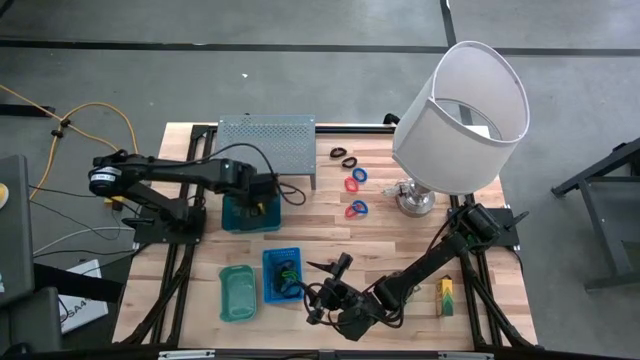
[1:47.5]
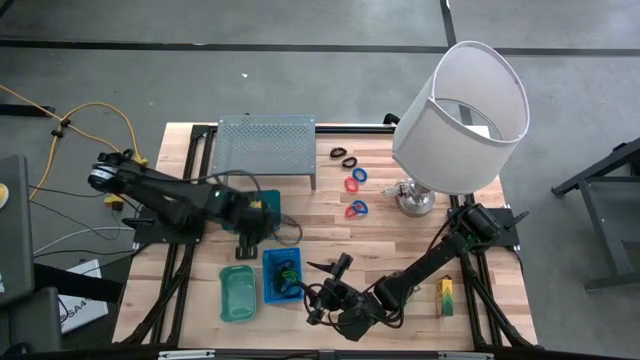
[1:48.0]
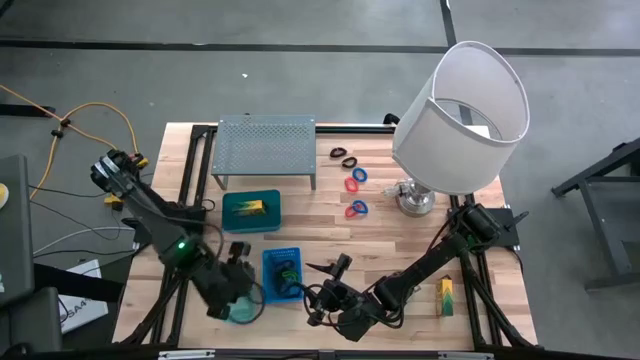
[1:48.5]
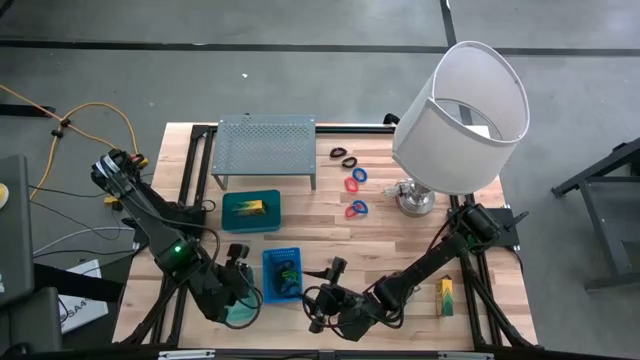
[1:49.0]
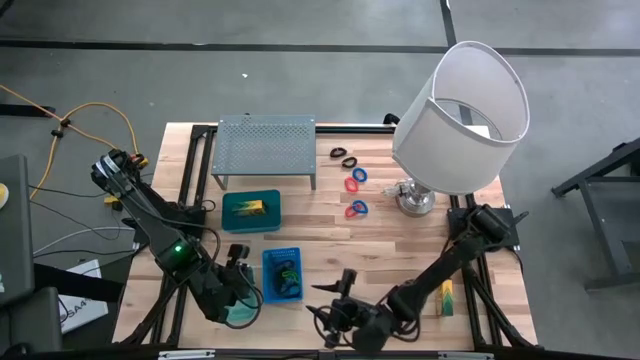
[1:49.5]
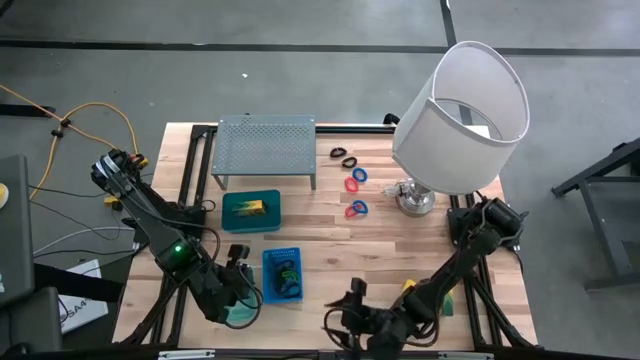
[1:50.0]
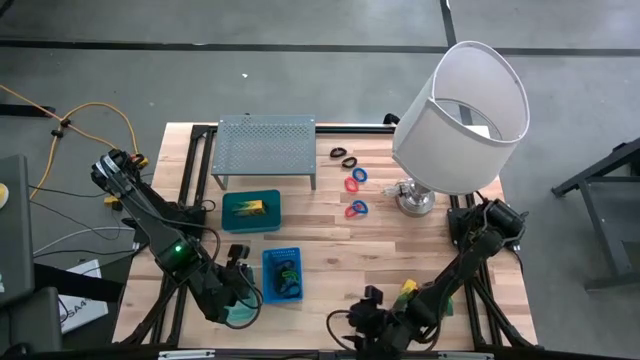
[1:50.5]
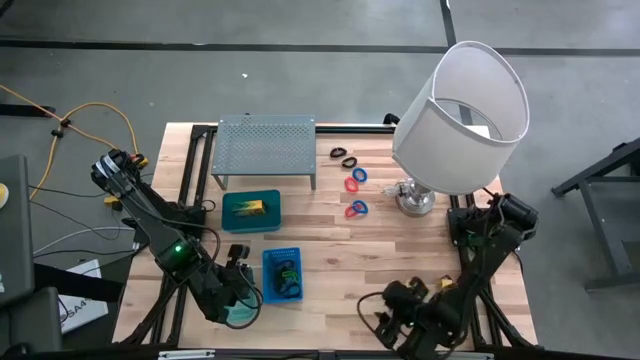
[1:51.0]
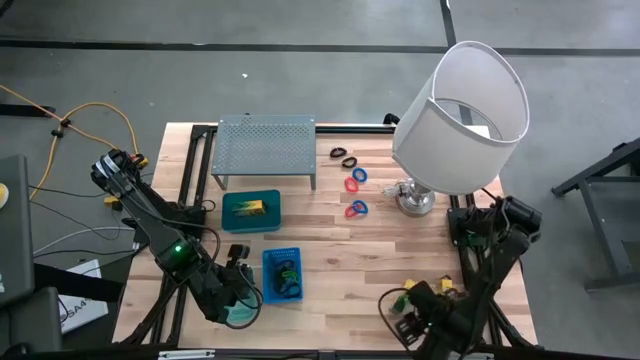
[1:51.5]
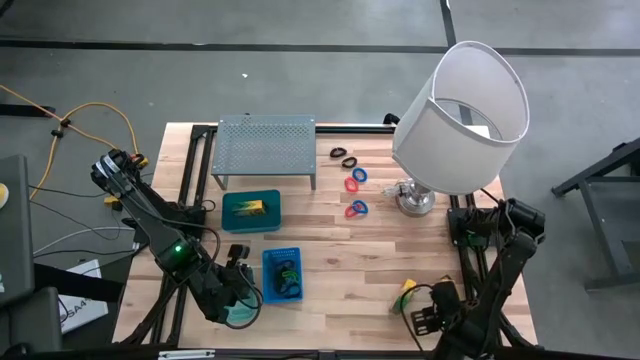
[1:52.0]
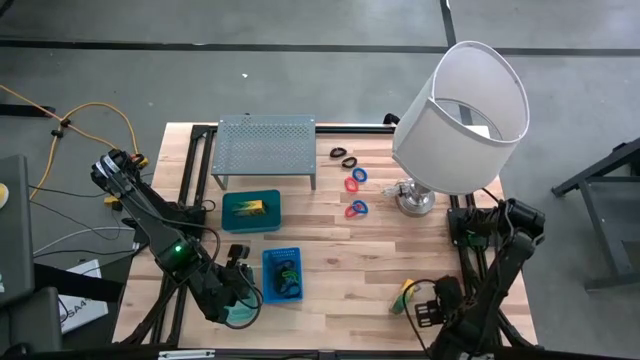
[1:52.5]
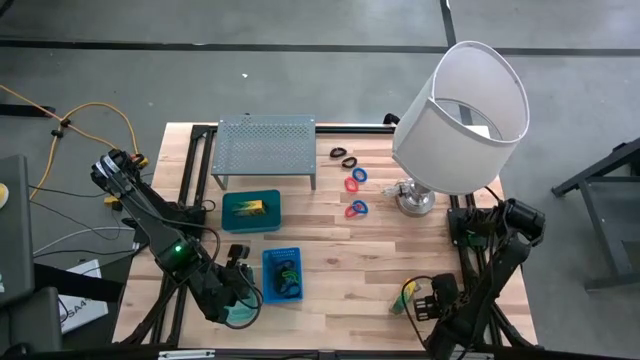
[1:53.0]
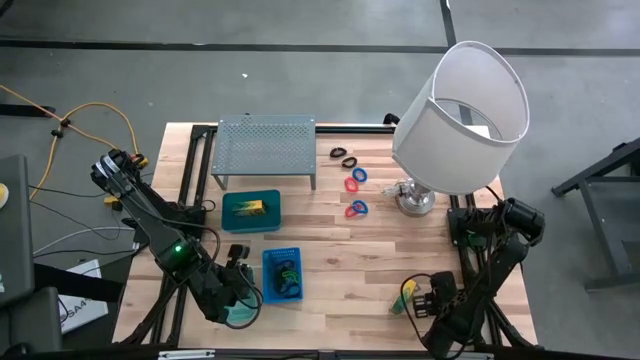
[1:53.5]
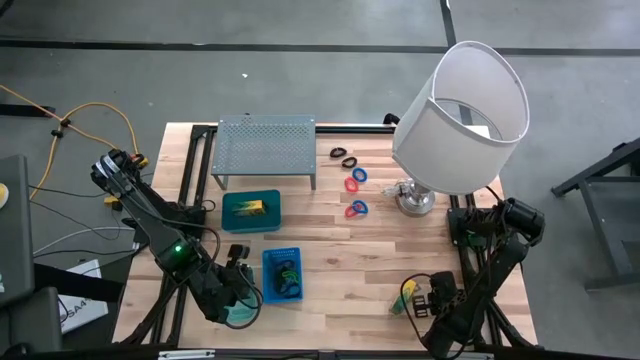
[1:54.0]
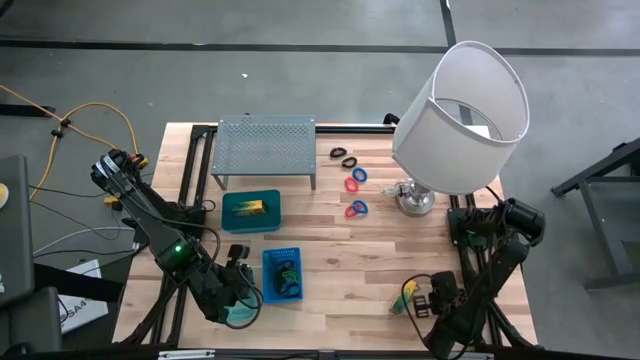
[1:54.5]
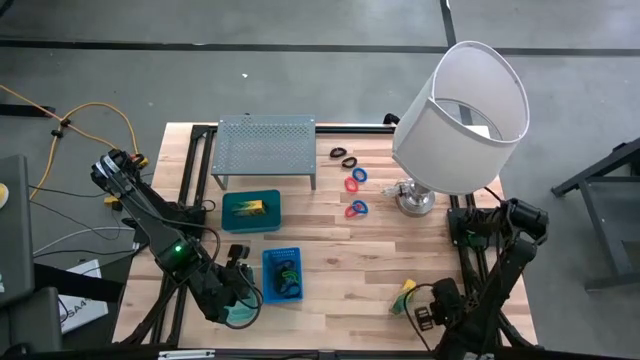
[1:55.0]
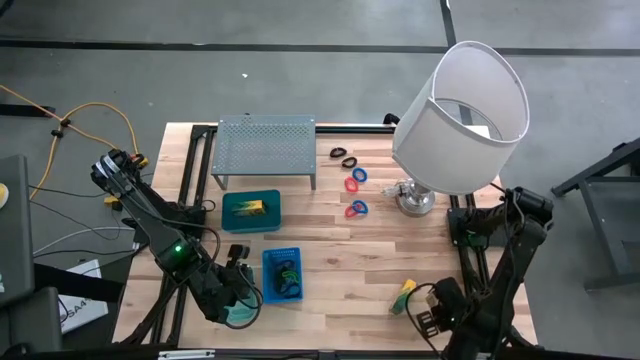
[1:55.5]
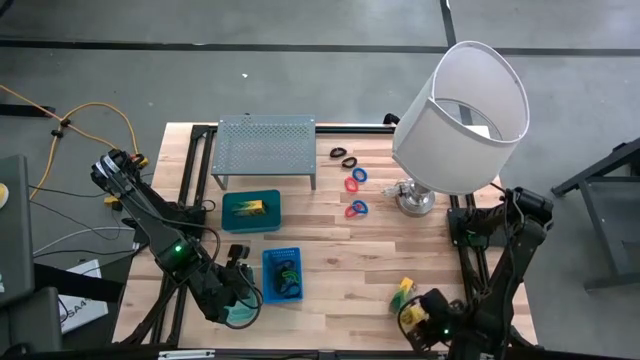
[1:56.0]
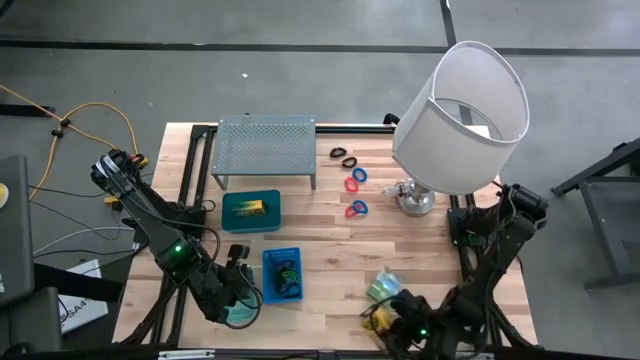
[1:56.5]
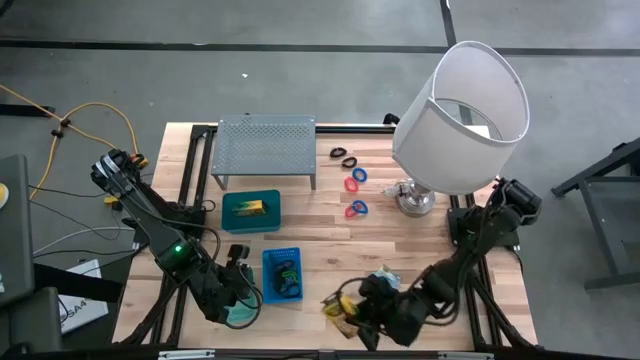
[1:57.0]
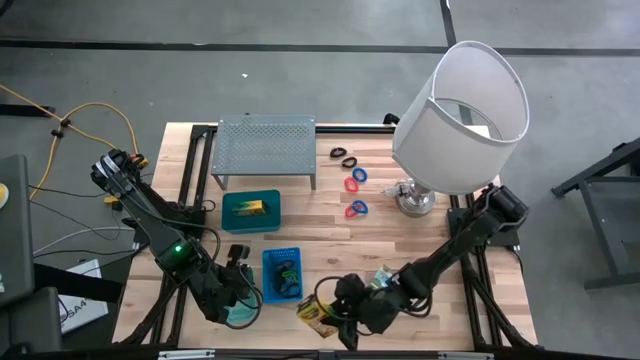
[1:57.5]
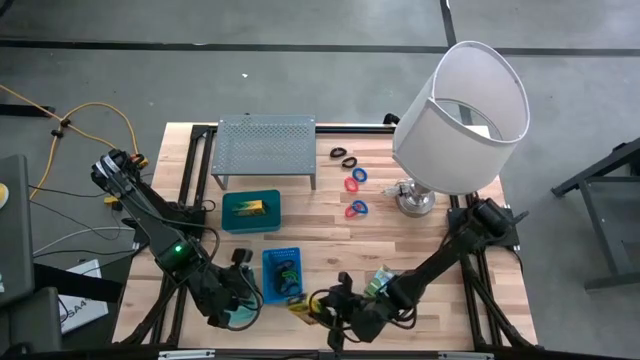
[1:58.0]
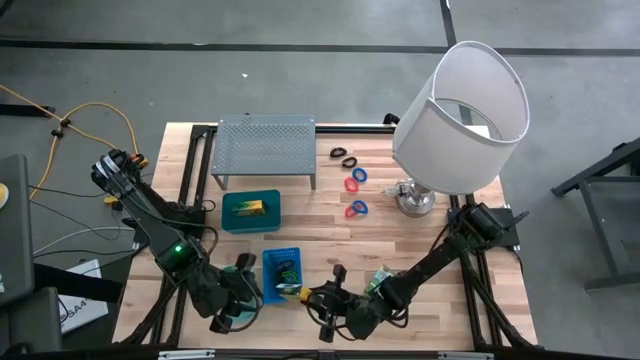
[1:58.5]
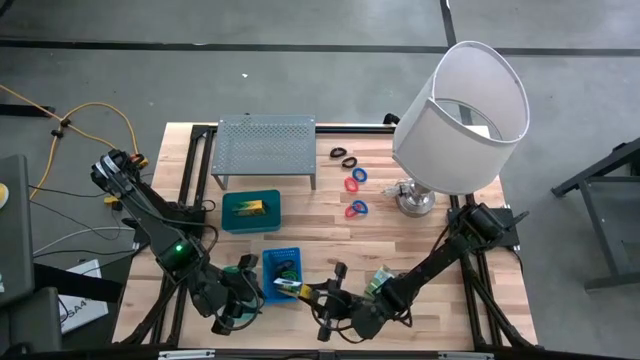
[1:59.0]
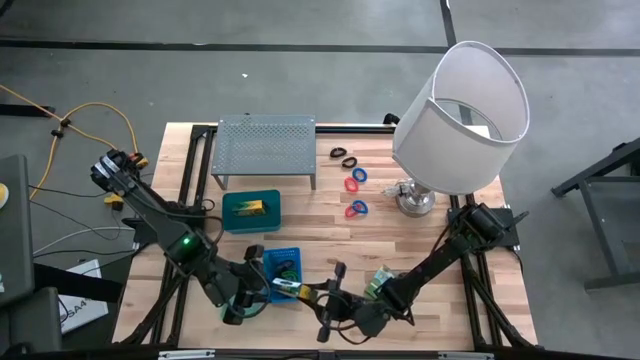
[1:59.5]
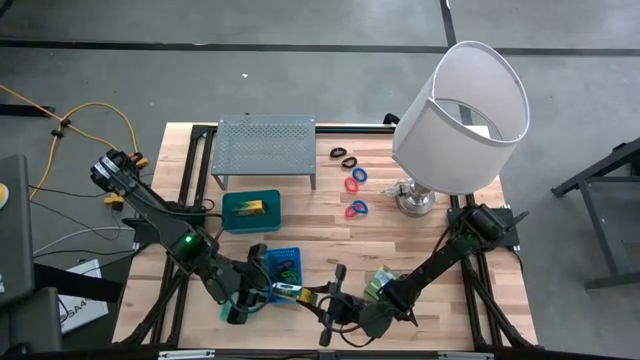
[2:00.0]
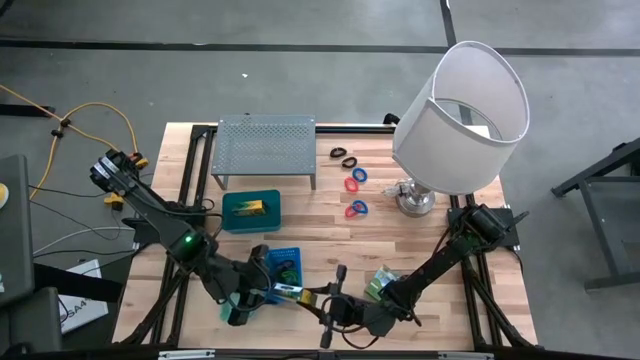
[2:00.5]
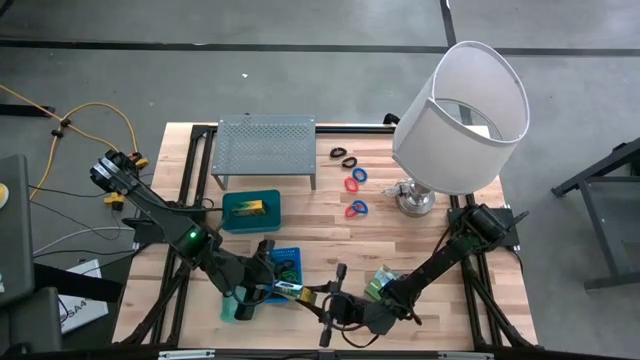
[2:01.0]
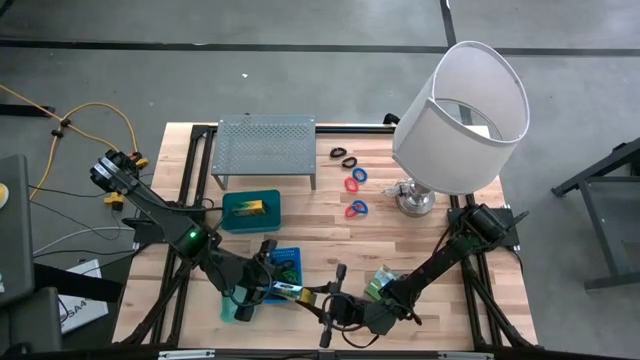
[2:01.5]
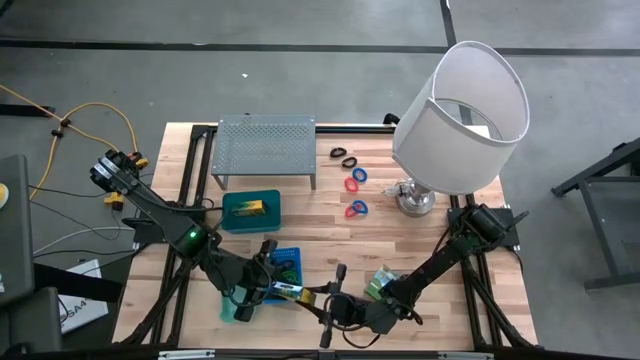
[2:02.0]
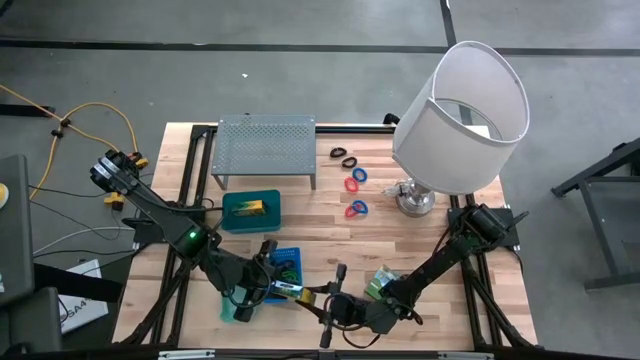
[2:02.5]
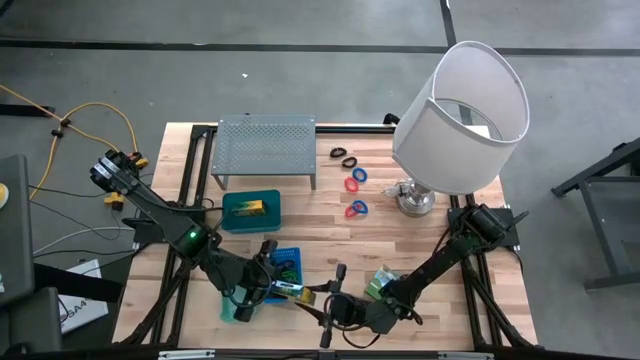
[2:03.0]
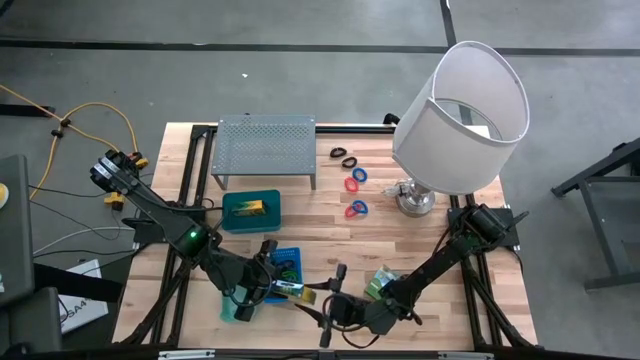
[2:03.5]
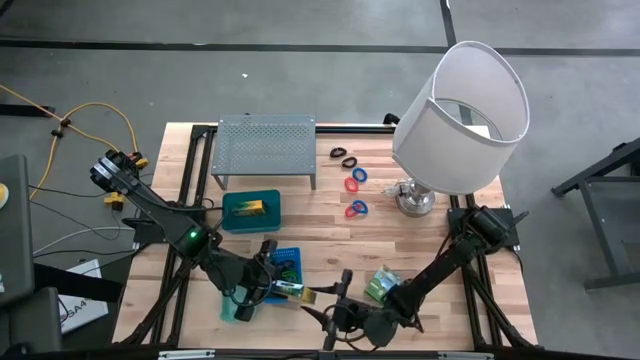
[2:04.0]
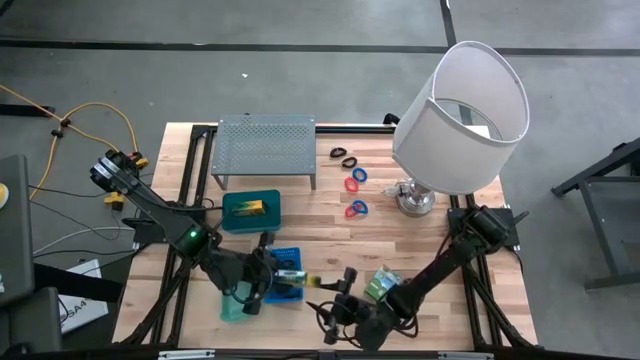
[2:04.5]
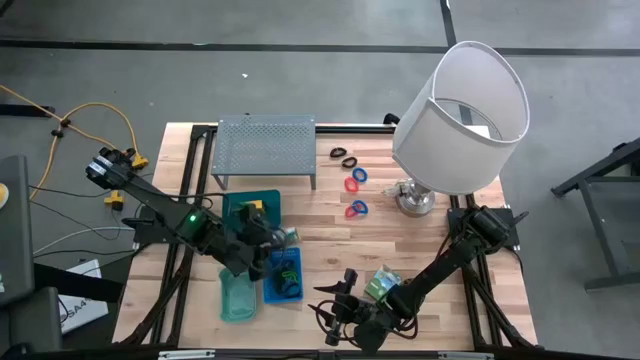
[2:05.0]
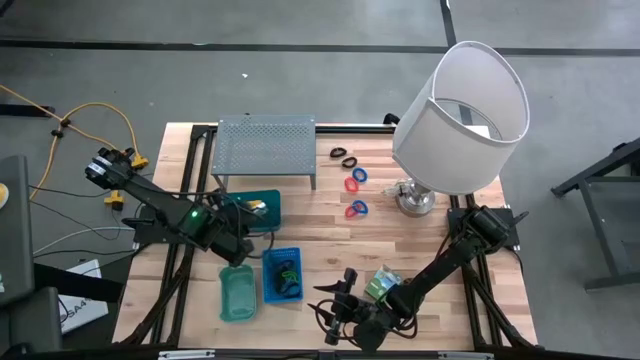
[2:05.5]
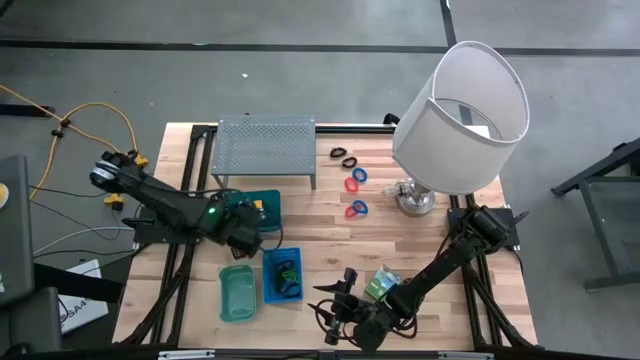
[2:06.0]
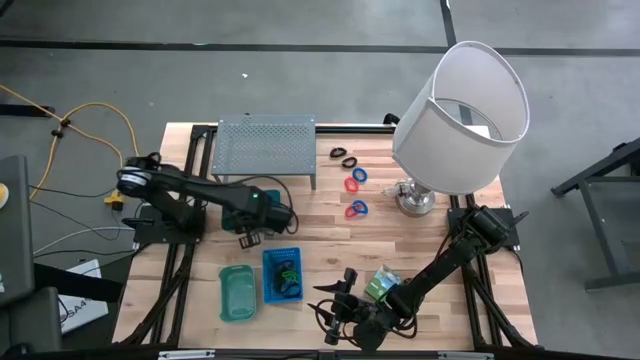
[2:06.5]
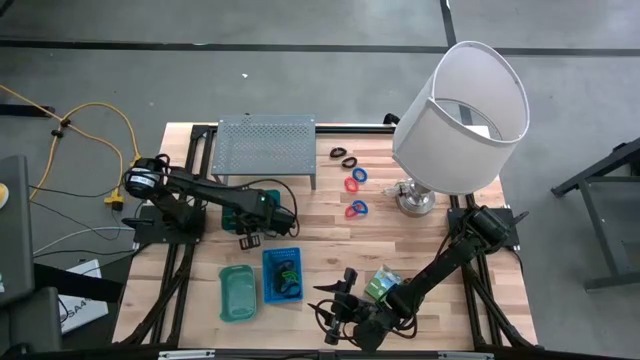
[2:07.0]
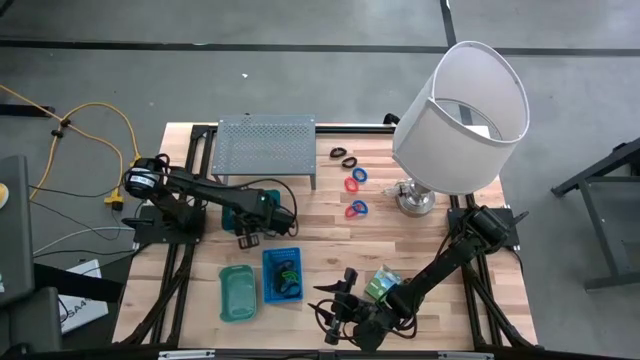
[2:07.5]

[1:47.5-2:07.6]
Task: Pick & Place Office Desk Supplies
Put the right crayon box into the top blue bin

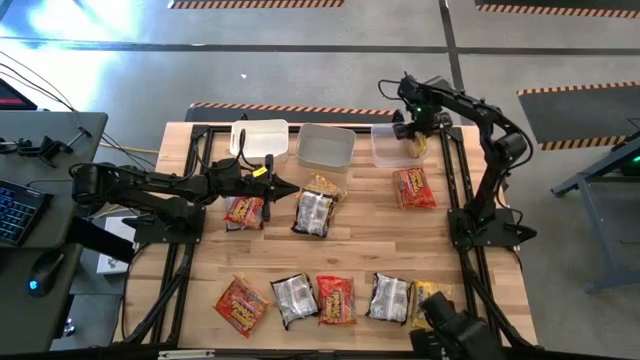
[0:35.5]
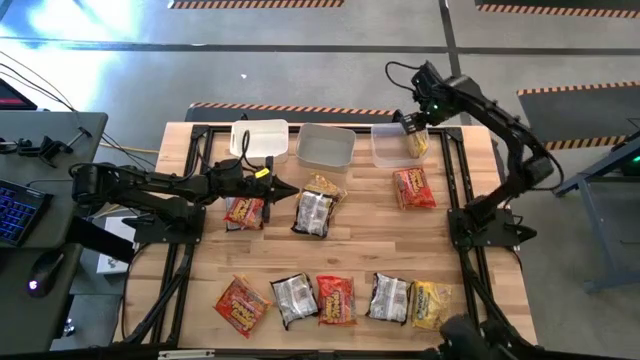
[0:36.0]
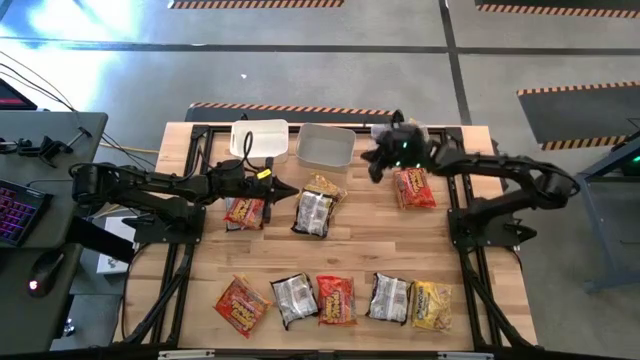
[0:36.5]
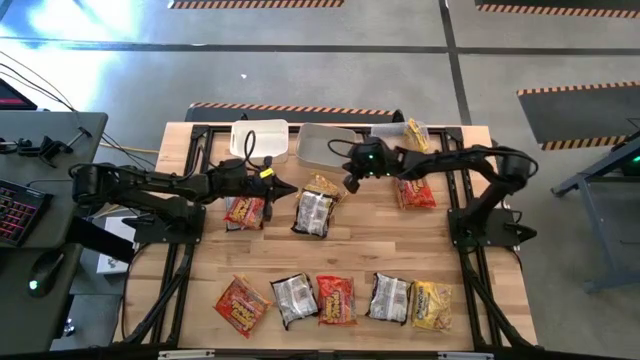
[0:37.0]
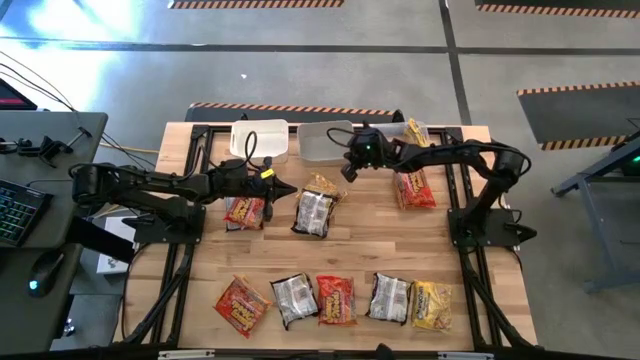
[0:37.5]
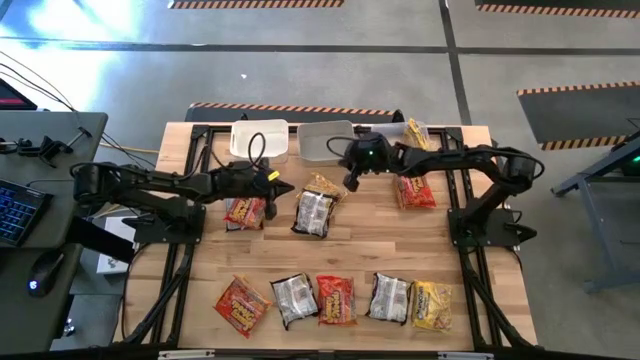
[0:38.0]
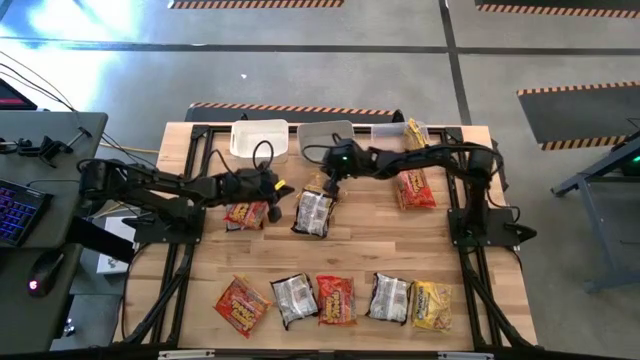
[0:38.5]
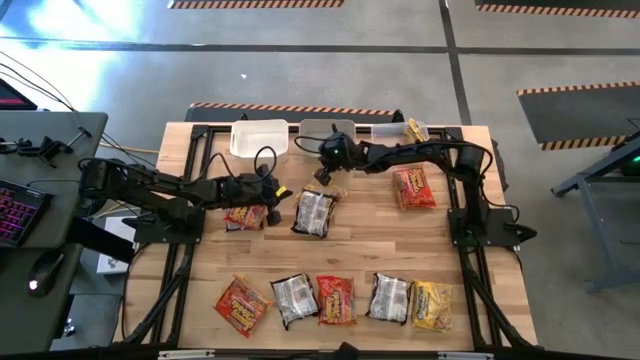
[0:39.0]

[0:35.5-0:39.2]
Task: Sort Maruchan noodles
Adjust the gray bin
